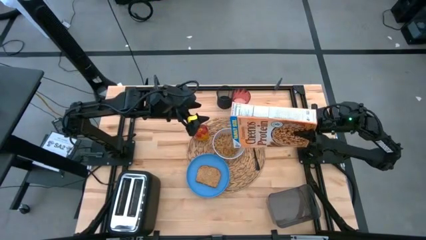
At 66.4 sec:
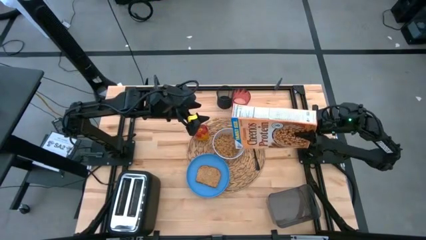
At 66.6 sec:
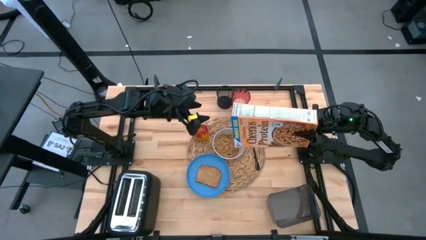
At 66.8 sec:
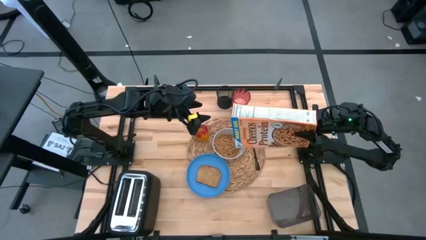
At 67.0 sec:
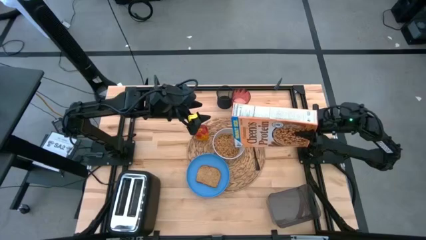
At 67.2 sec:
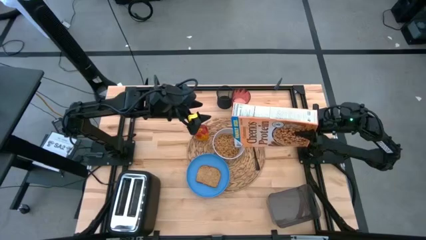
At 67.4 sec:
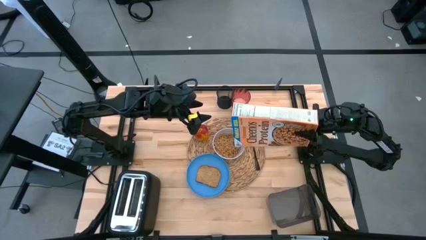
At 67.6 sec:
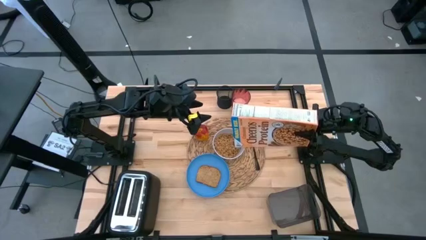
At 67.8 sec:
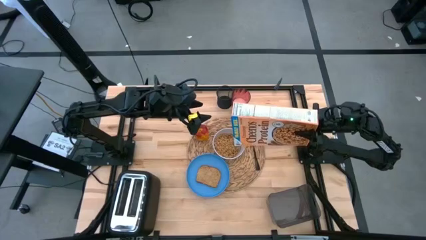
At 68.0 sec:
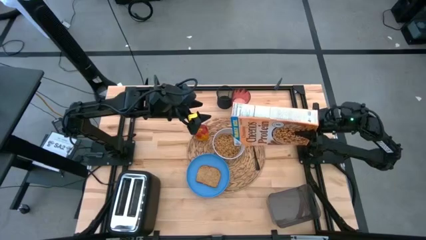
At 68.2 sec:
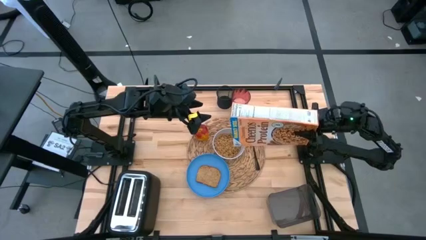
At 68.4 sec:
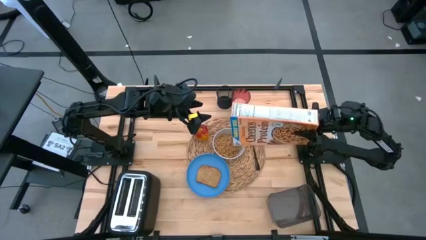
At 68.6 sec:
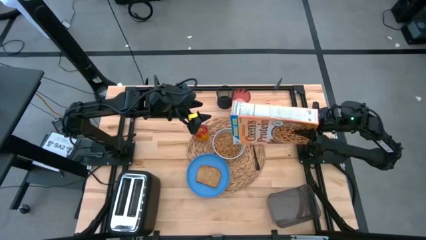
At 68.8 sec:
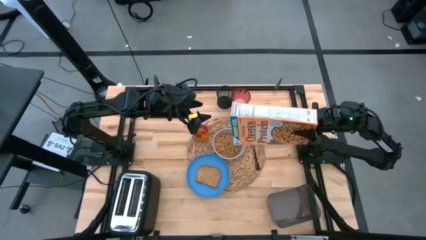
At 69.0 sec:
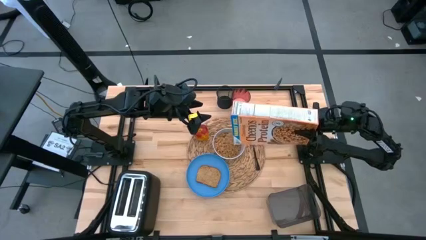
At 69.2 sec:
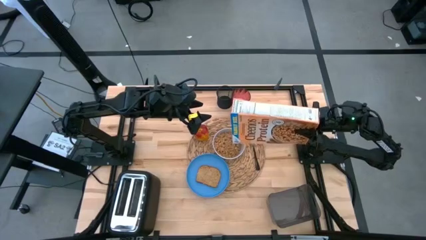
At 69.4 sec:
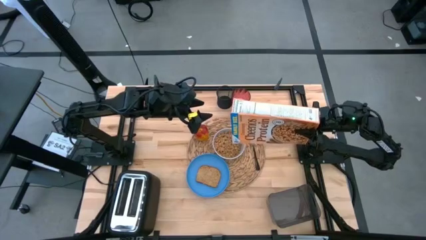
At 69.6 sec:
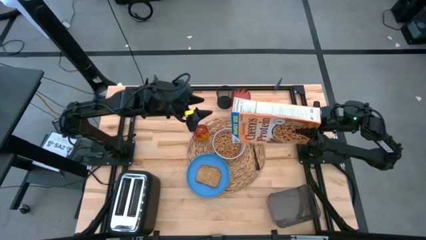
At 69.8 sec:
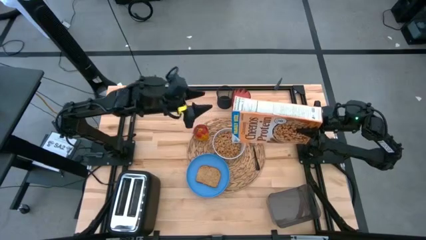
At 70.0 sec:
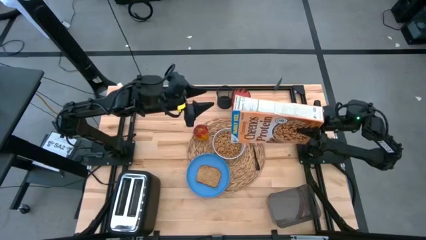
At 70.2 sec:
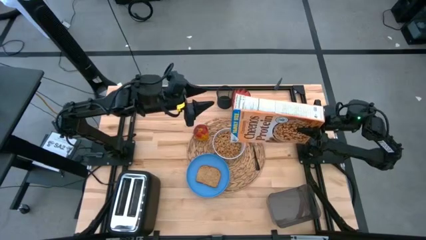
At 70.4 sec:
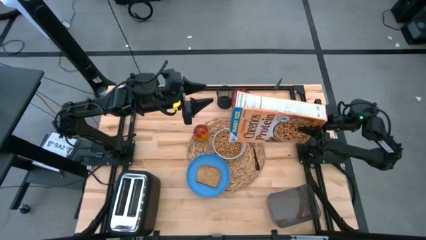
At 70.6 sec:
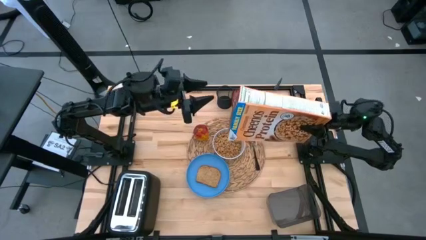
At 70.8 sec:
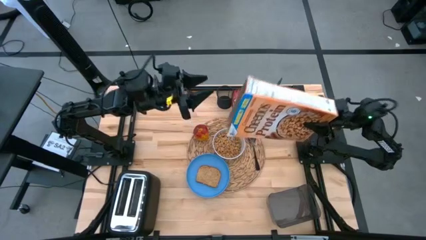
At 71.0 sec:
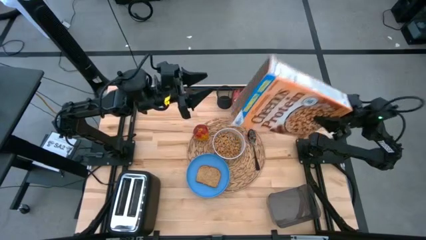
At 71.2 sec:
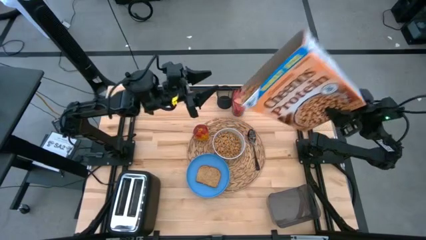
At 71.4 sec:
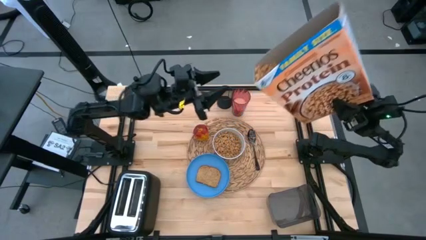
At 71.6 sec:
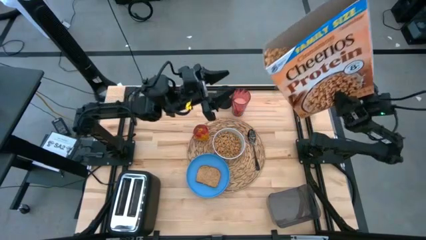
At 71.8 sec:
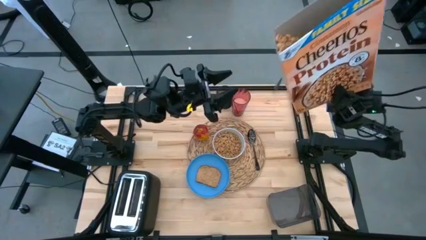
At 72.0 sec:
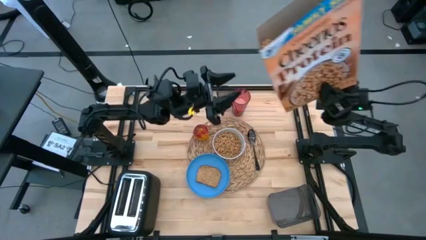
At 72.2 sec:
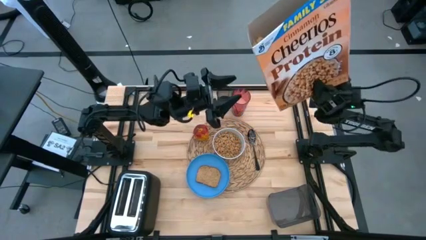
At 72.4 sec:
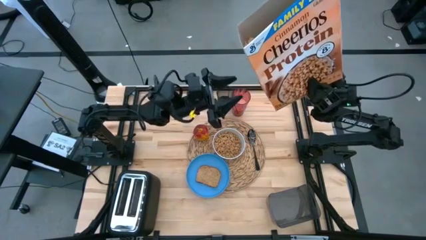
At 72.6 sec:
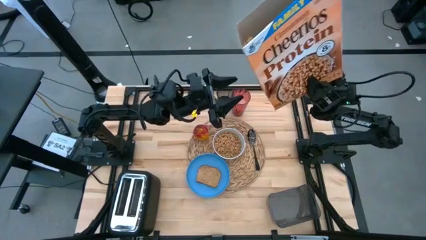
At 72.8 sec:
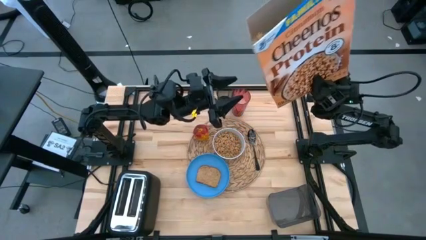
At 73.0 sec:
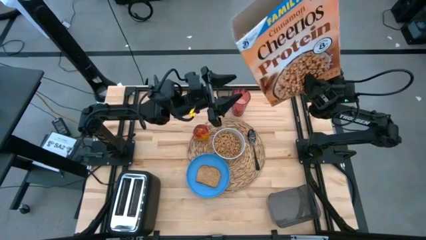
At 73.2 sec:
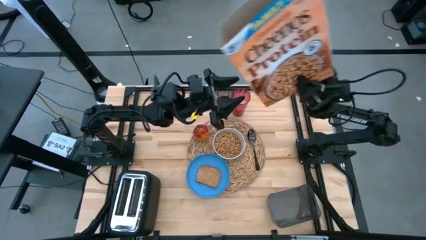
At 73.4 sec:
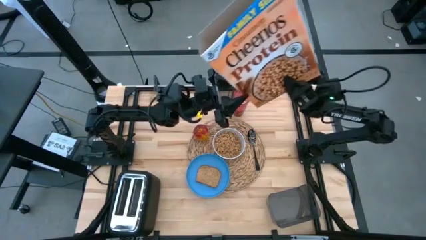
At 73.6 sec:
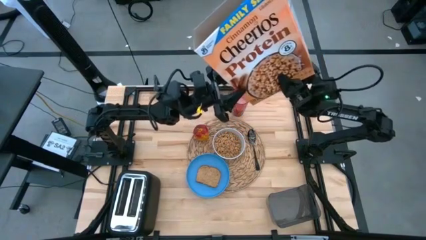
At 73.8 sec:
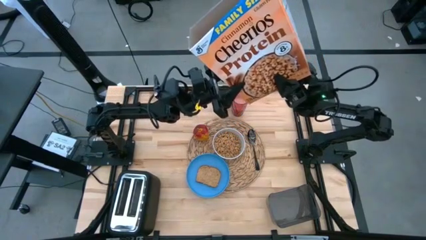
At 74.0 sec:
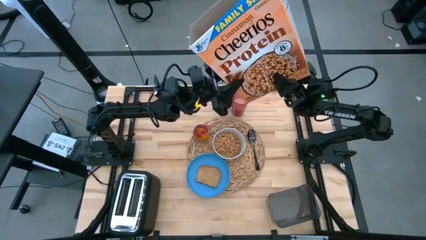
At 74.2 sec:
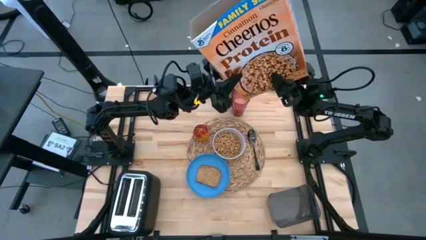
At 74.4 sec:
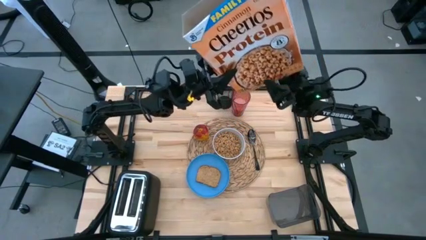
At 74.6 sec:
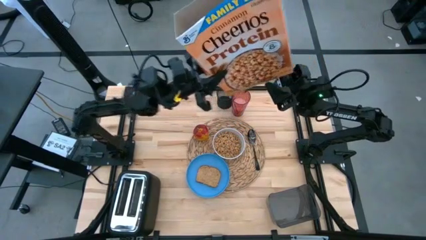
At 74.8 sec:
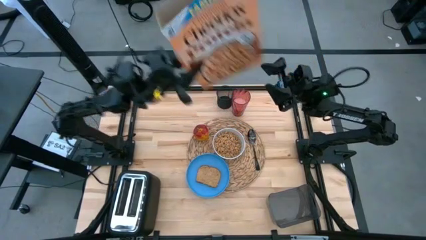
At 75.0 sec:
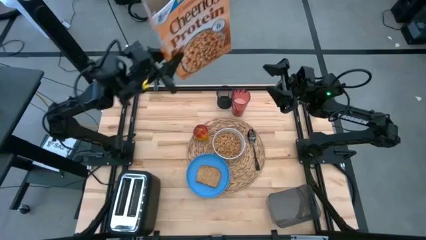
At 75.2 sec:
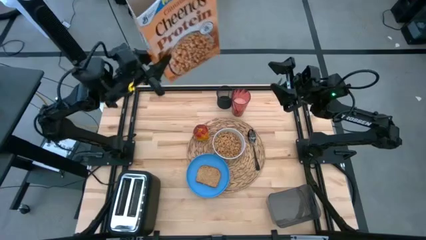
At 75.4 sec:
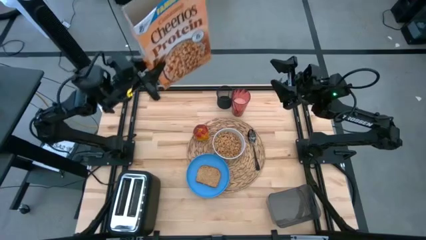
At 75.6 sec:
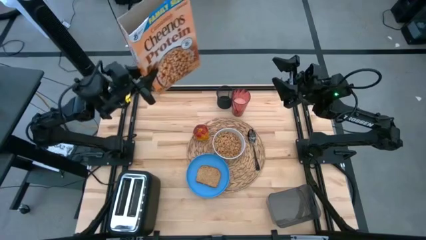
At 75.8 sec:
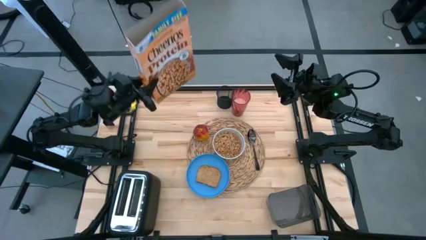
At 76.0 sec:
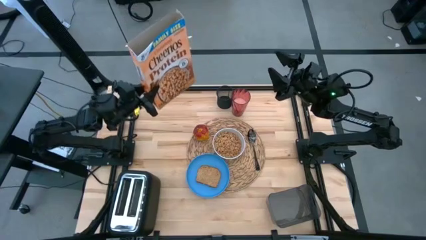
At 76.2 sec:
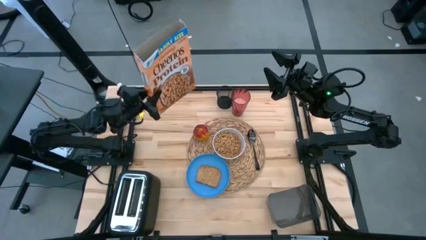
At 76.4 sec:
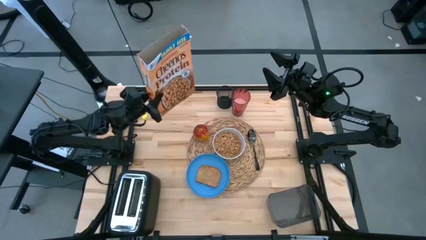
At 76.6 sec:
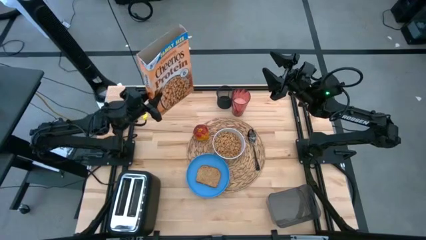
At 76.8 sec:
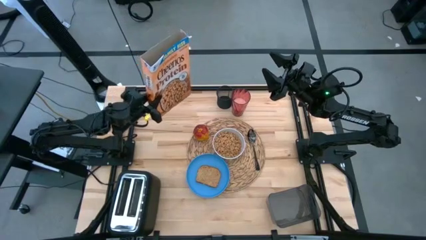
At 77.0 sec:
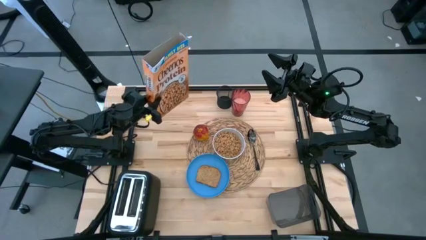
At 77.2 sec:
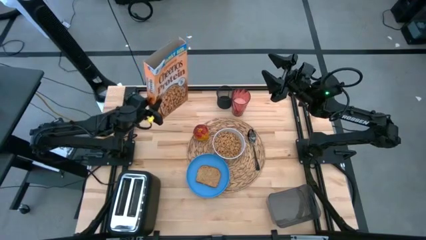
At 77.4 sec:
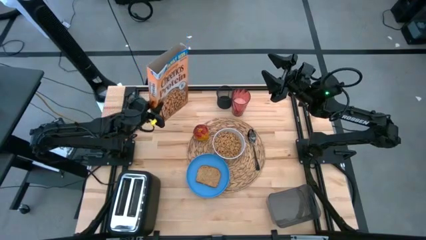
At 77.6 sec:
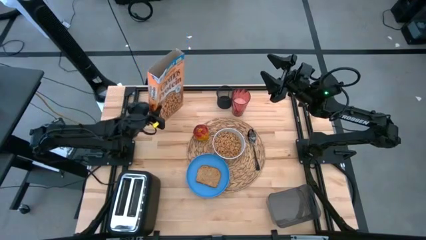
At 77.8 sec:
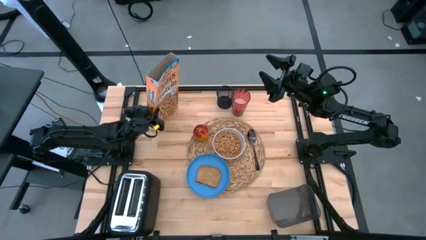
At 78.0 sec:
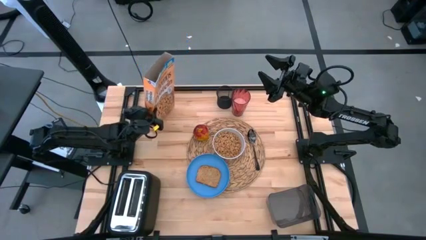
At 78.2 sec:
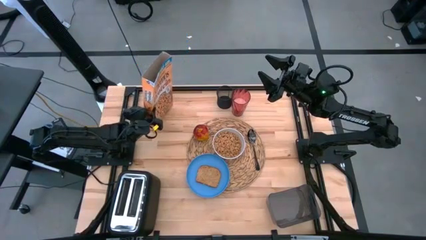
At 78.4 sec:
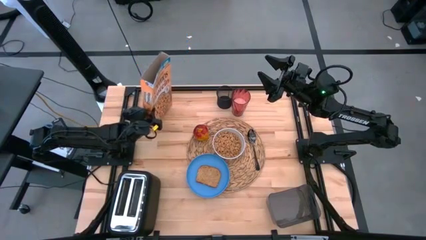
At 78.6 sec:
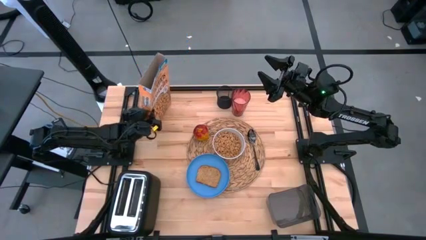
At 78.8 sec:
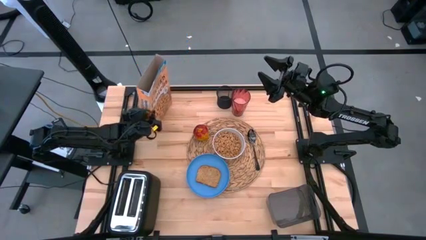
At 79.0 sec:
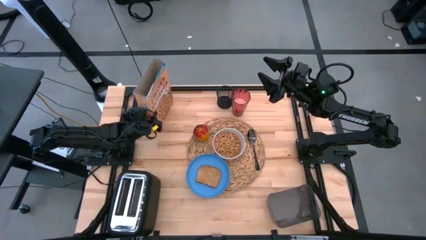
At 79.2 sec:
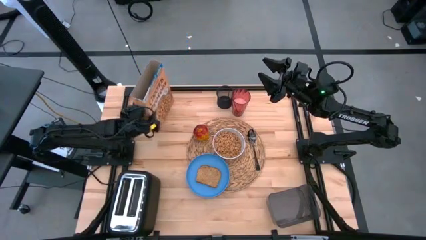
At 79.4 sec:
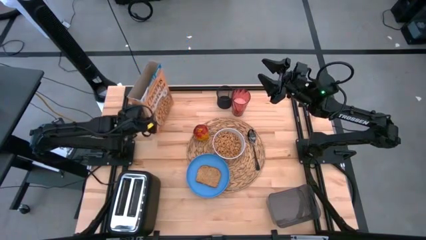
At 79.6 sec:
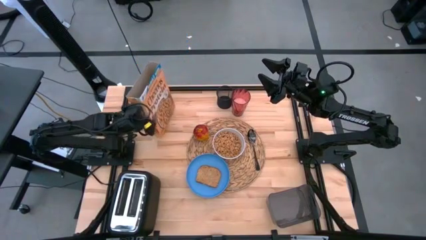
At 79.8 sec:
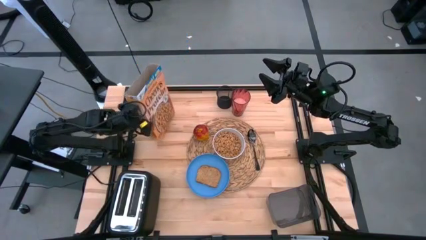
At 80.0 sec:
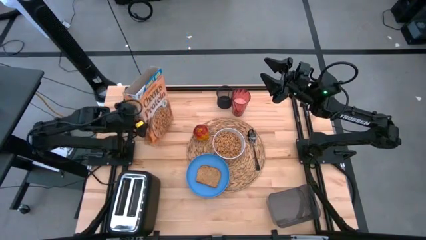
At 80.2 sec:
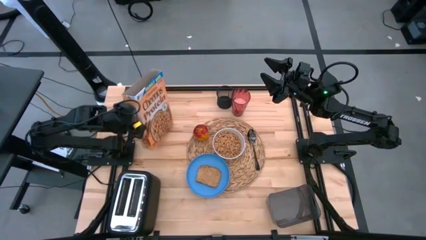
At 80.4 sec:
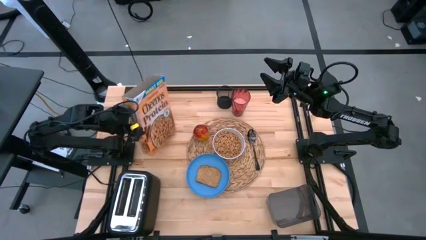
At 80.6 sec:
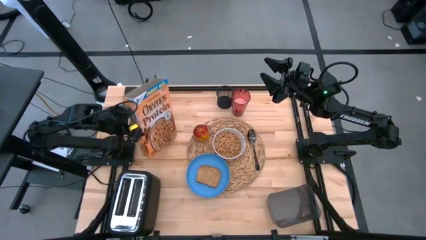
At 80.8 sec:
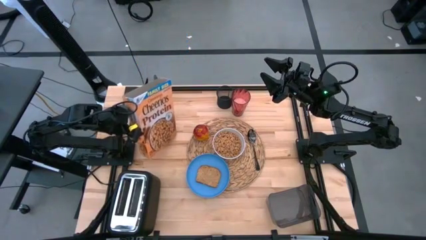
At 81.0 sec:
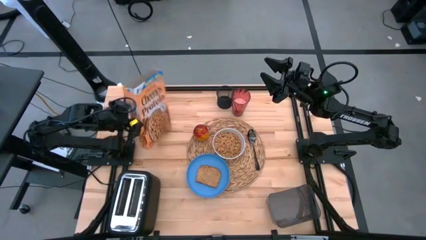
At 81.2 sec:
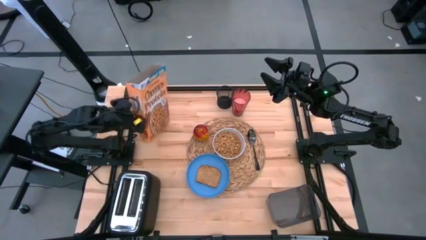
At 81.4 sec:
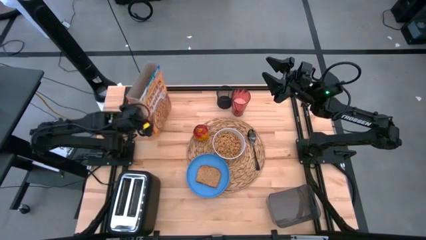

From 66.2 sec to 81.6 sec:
Task: Arrange a breakfast setting
Pour the brown cereal from the orange cereal box into the white bowl
